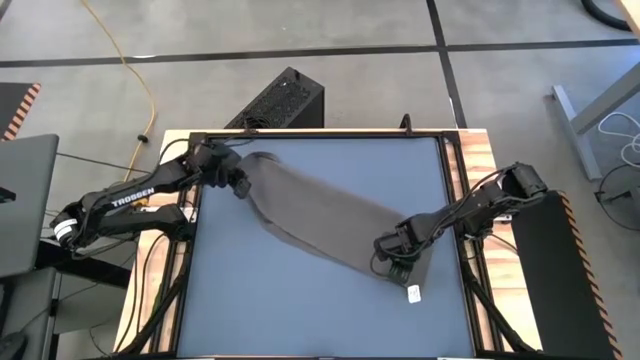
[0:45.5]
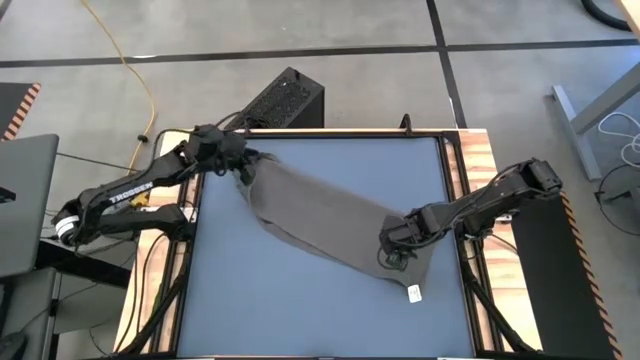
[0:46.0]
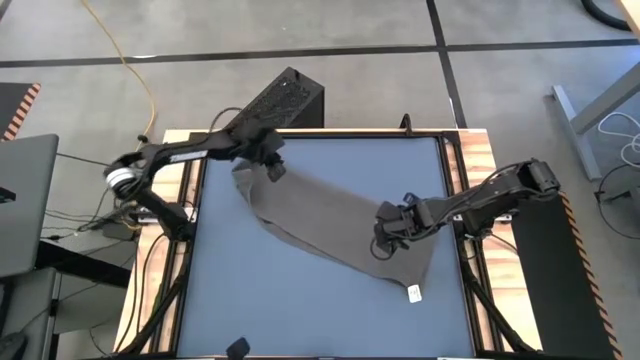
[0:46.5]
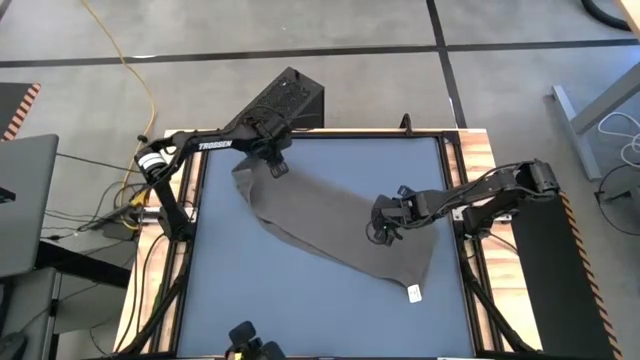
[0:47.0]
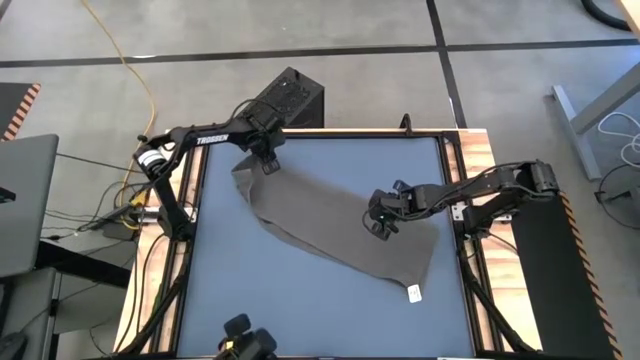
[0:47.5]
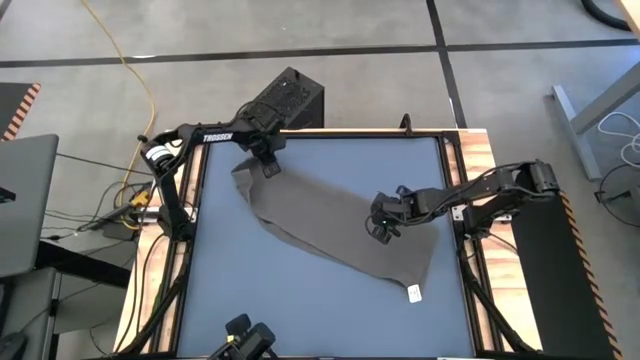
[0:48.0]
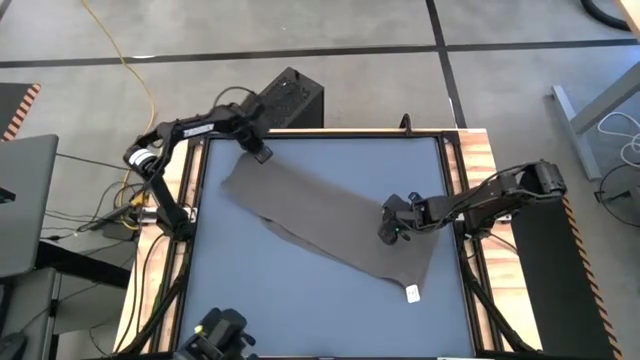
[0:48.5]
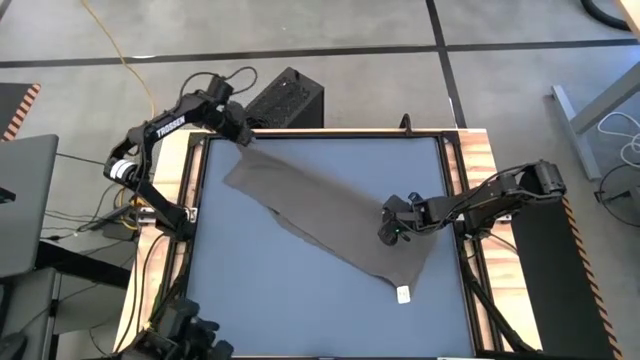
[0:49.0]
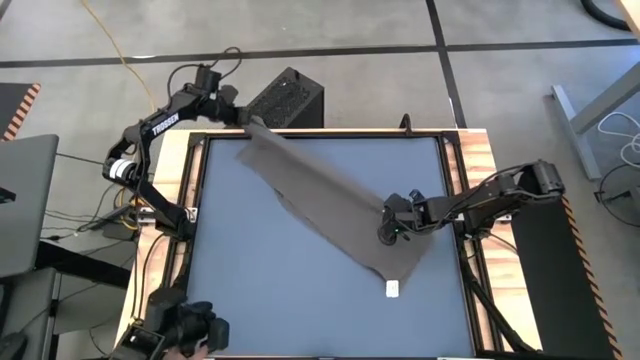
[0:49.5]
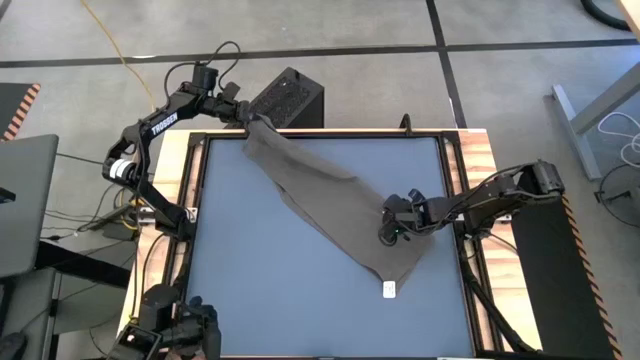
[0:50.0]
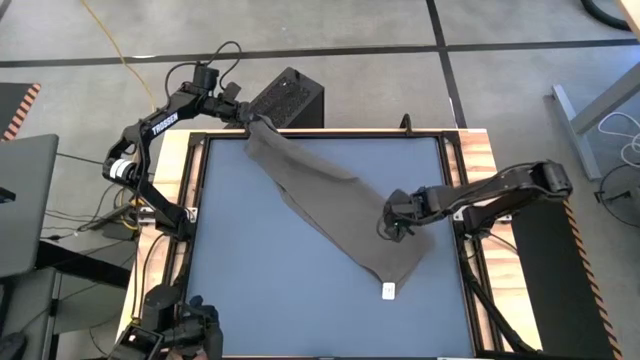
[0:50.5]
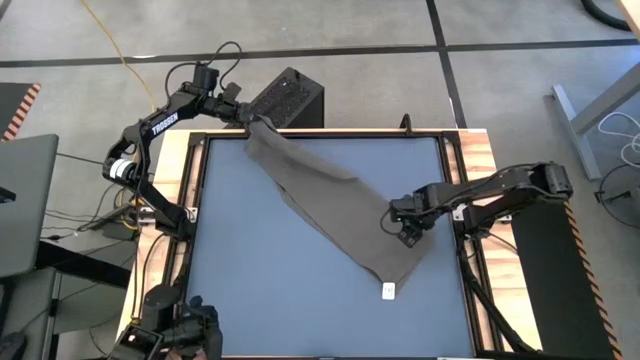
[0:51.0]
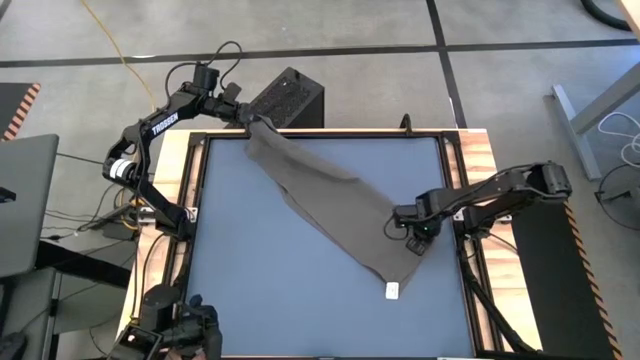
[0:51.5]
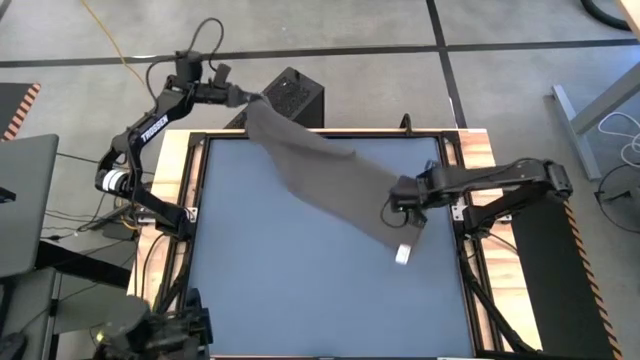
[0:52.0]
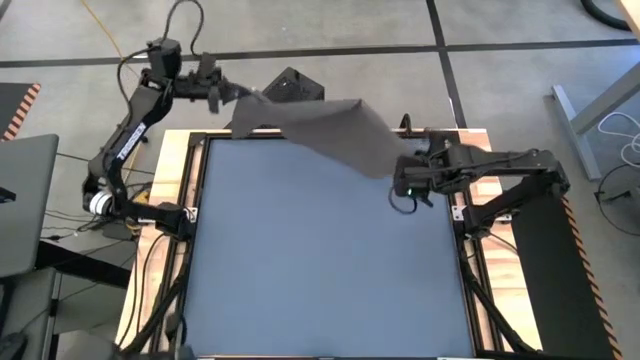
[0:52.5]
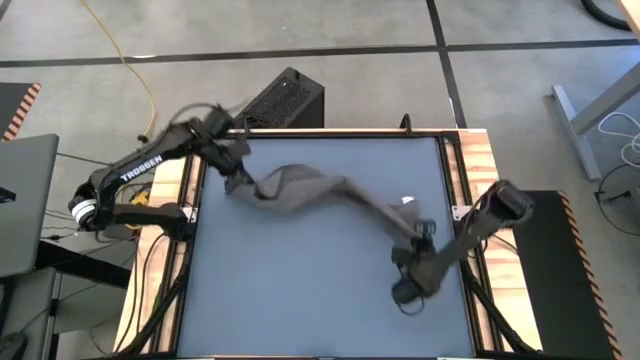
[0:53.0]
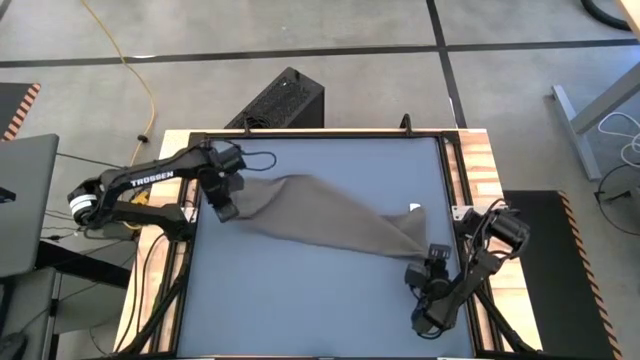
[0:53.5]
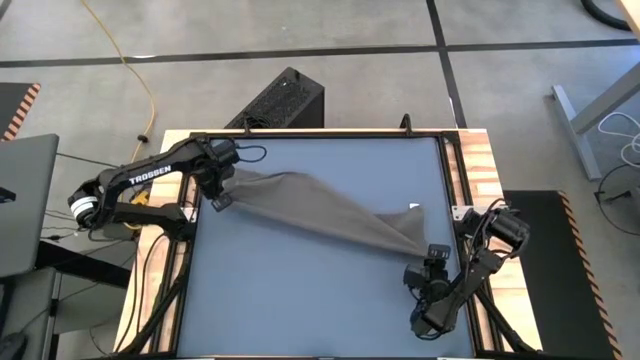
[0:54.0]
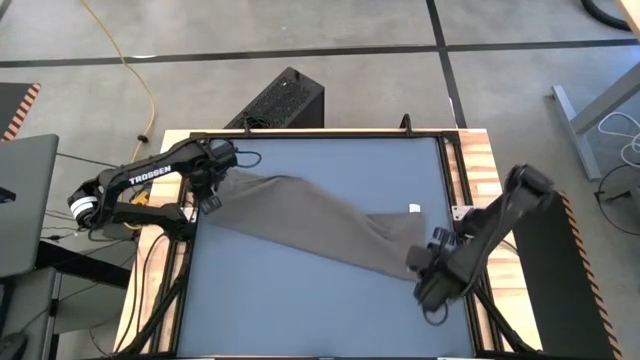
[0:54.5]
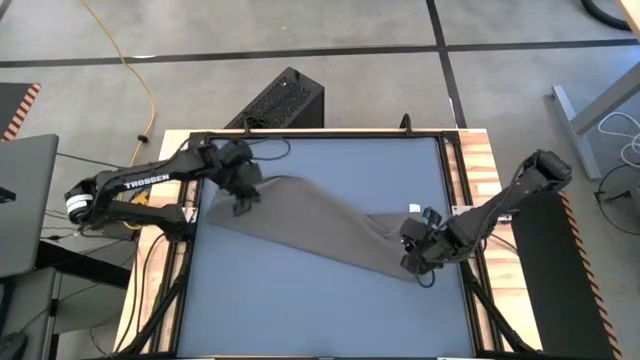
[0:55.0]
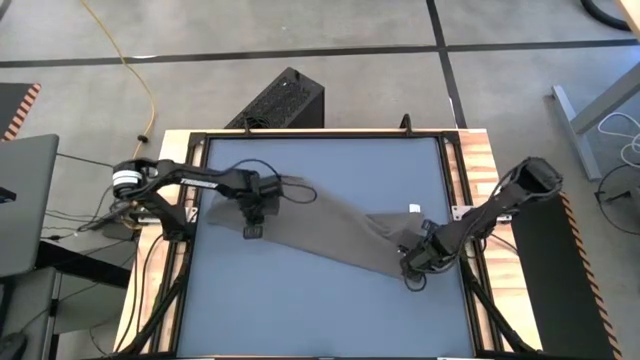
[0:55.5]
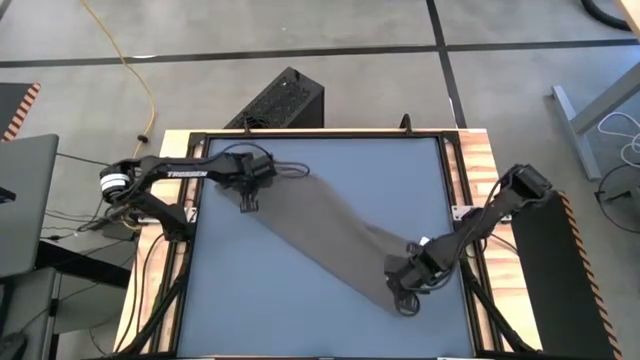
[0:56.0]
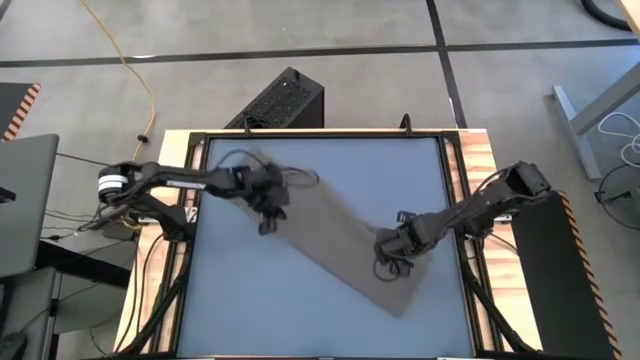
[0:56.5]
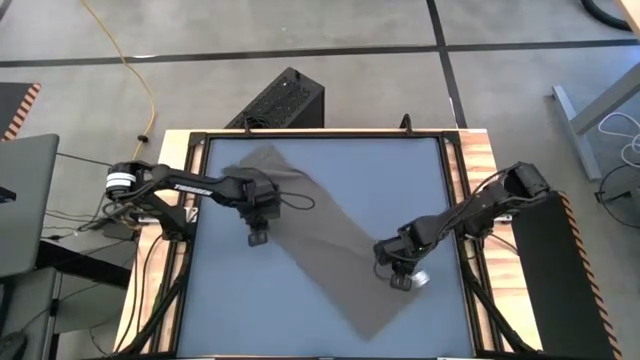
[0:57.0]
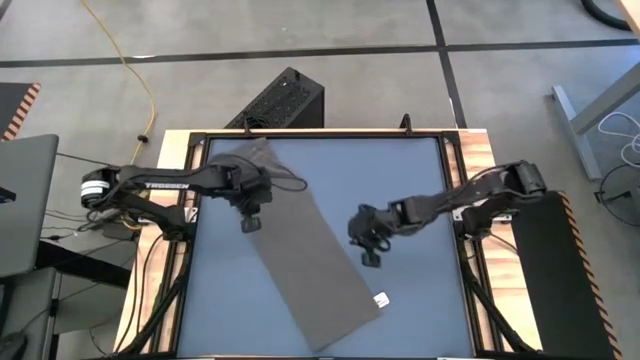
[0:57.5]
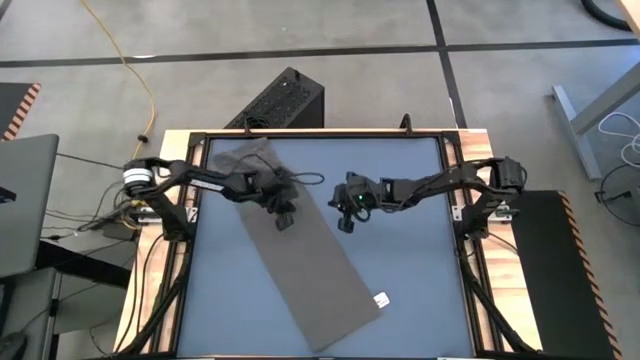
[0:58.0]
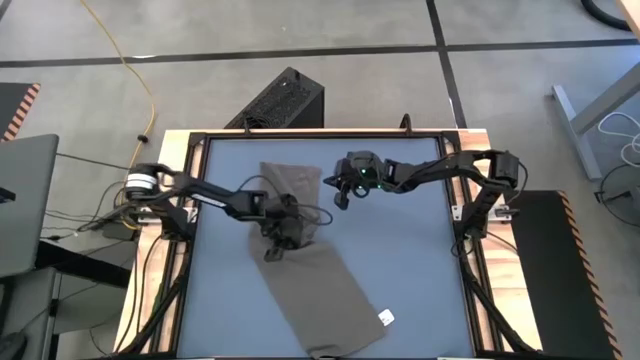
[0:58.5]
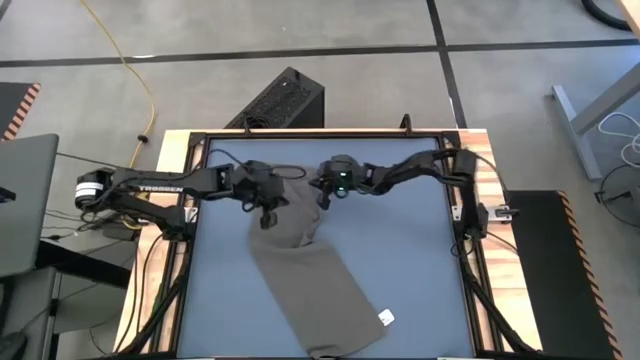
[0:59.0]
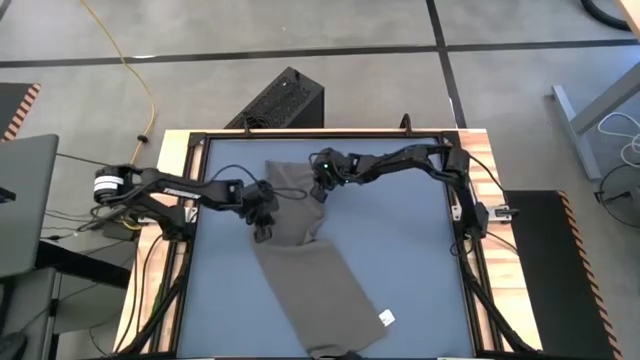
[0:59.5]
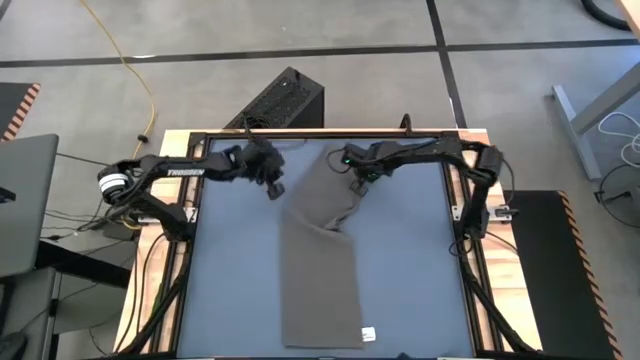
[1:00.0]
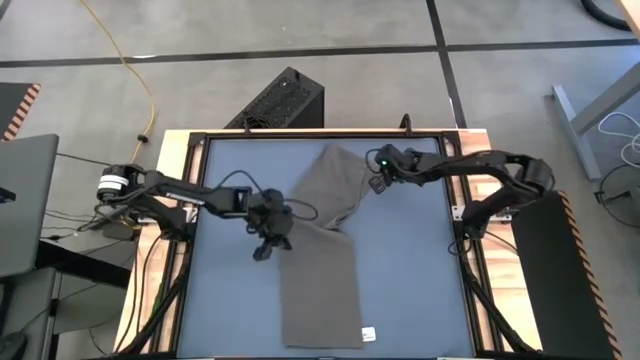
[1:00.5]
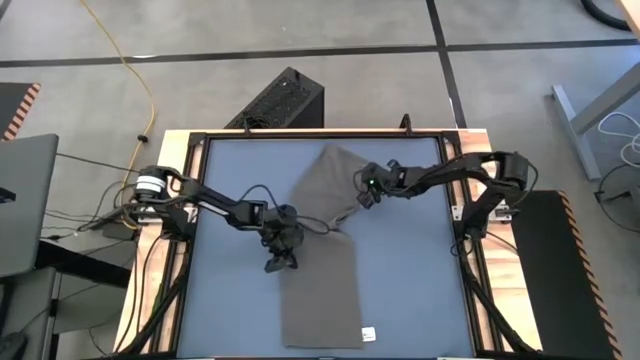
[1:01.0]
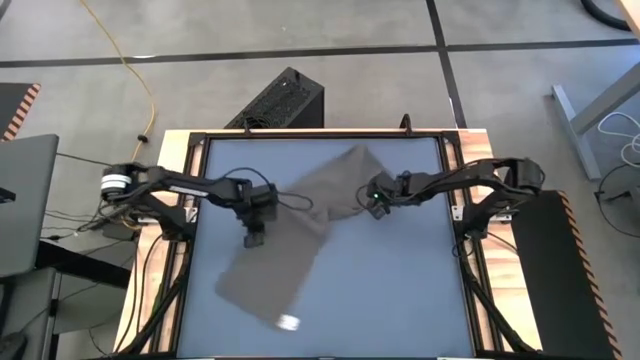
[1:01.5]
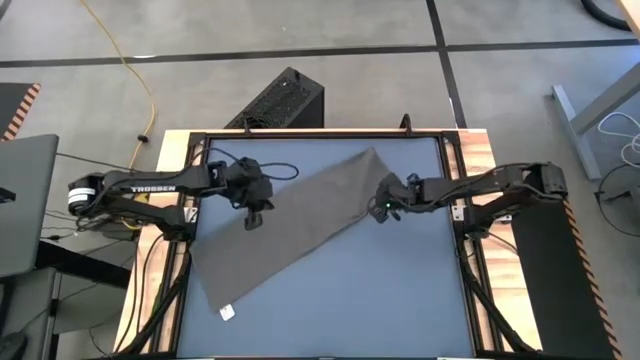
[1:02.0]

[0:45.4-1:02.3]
Task: Roll towel into tight, uniform cylinder
Fold the gray towel

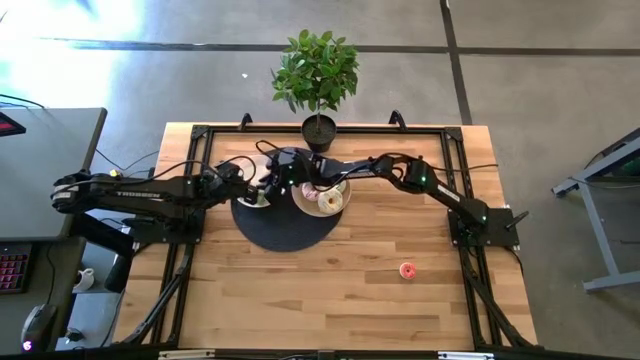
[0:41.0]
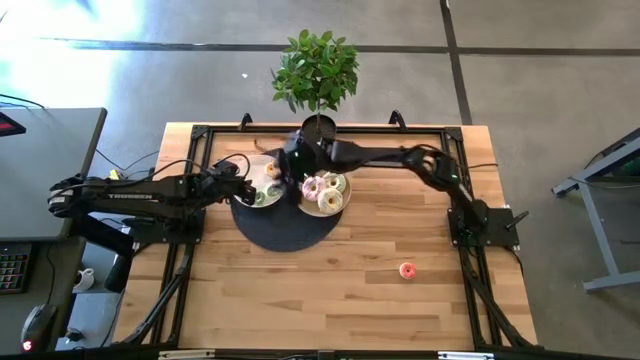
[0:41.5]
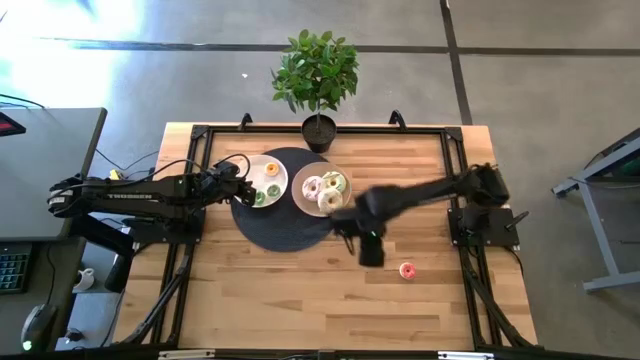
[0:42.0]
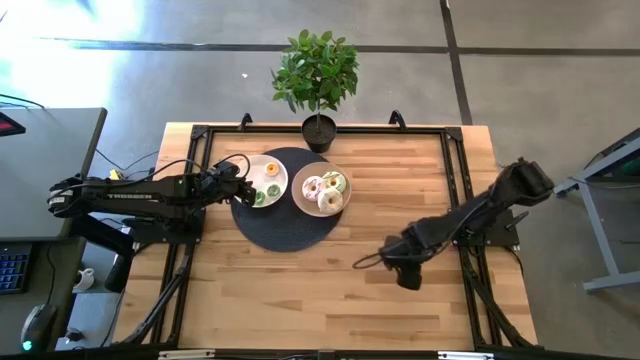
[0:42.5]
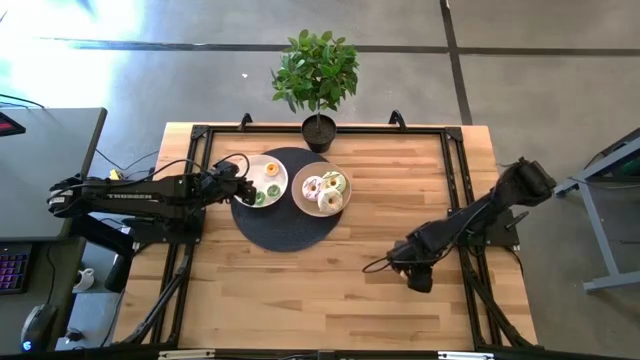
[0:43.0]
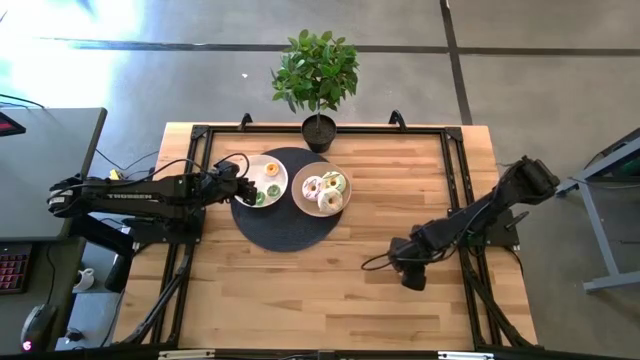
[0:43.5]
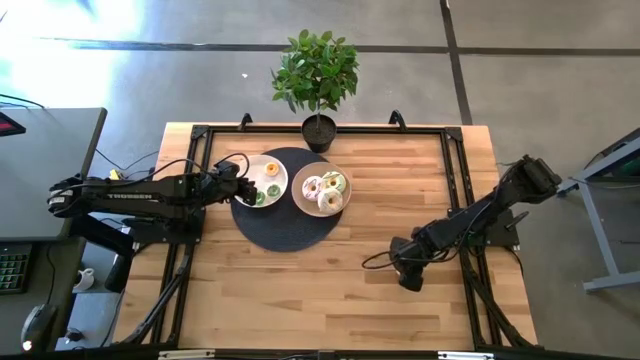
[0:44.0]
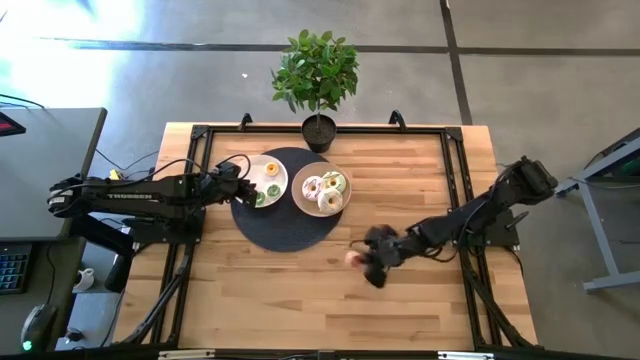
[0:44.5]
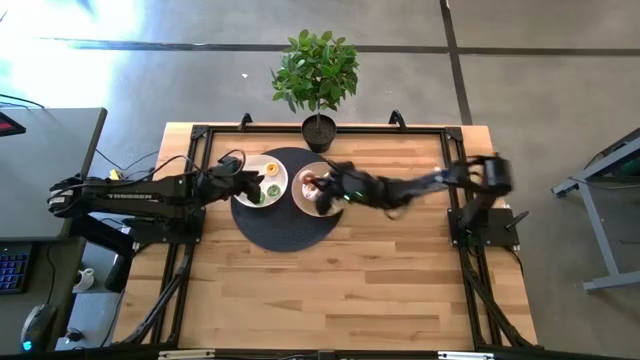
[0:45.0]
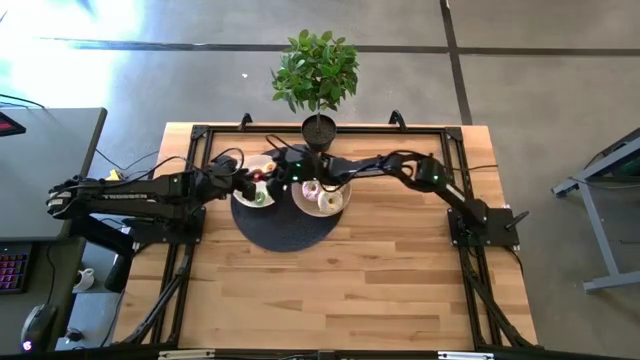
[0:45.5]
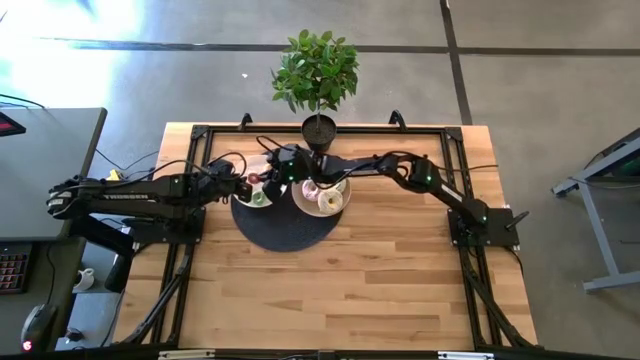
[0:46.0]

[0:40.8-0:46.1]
Task: Pick & Place donuts
Put the small pink donut onto the white plate
